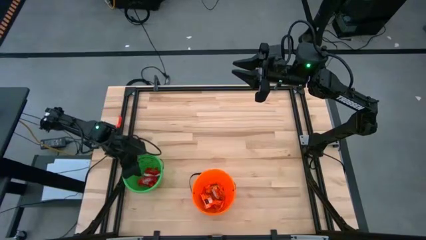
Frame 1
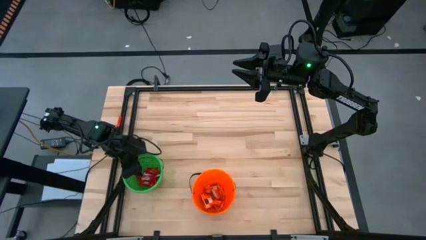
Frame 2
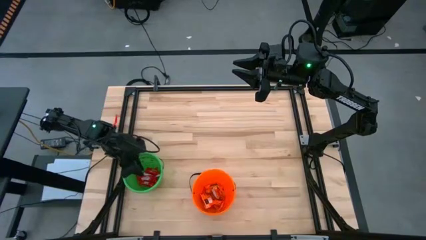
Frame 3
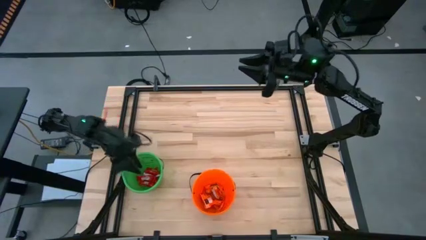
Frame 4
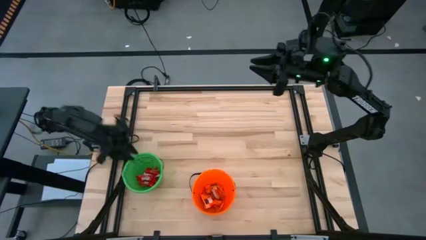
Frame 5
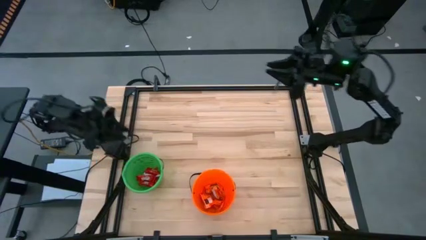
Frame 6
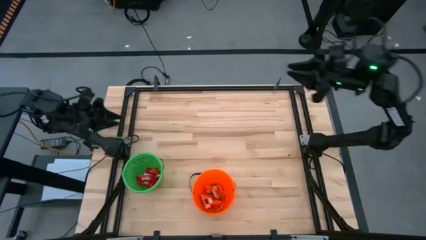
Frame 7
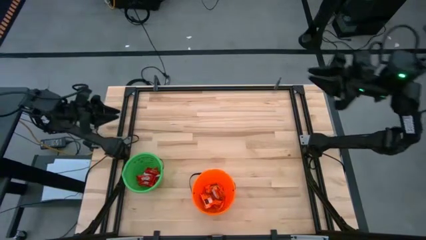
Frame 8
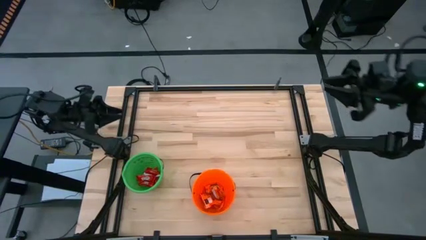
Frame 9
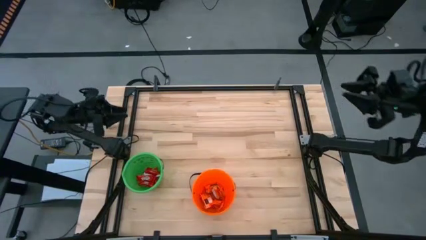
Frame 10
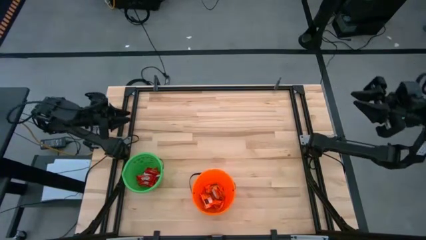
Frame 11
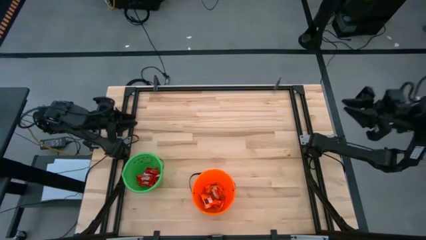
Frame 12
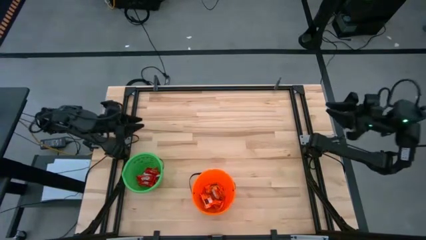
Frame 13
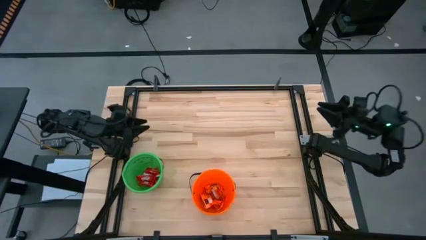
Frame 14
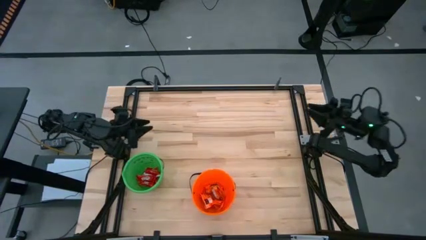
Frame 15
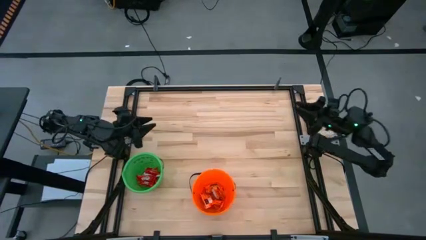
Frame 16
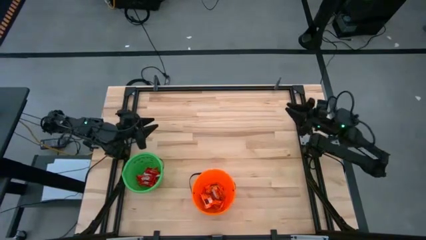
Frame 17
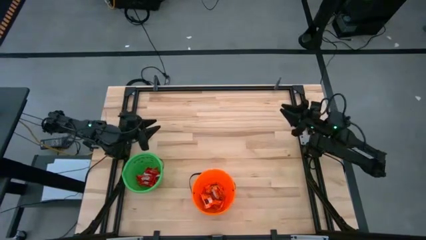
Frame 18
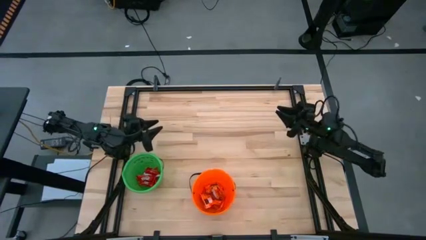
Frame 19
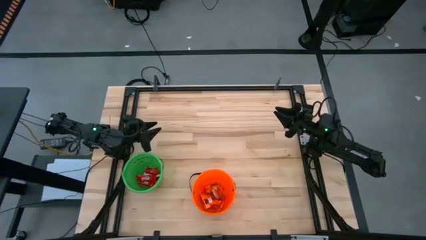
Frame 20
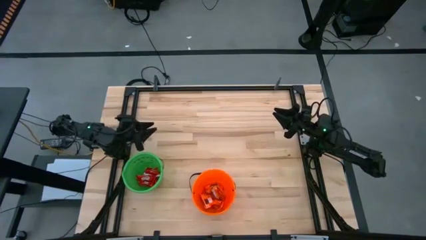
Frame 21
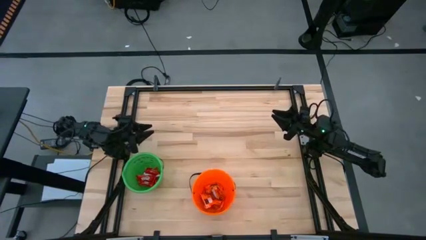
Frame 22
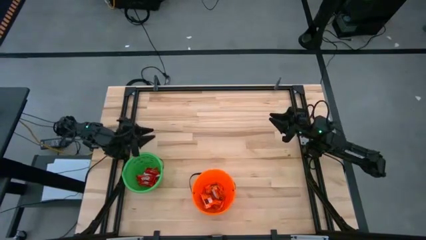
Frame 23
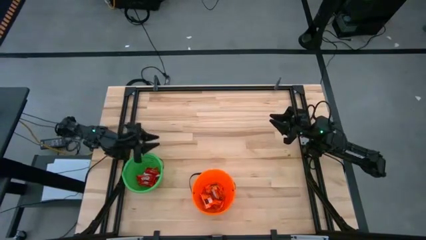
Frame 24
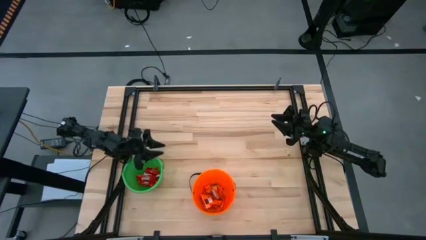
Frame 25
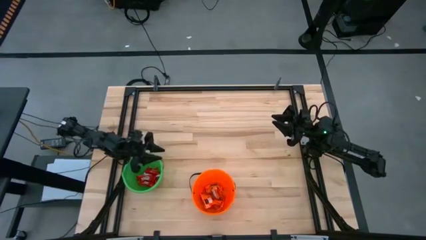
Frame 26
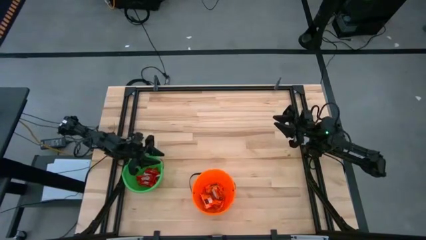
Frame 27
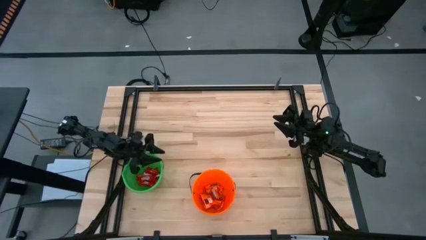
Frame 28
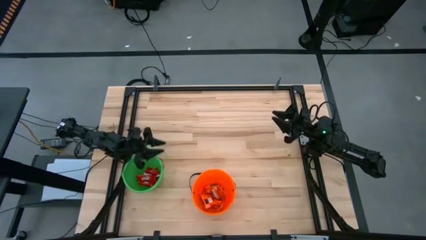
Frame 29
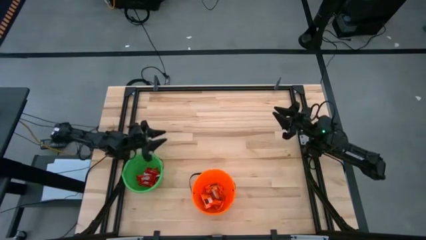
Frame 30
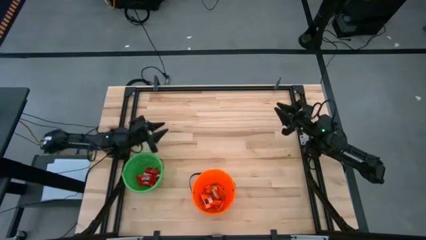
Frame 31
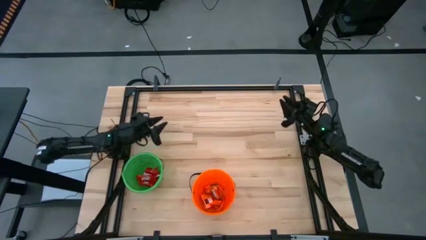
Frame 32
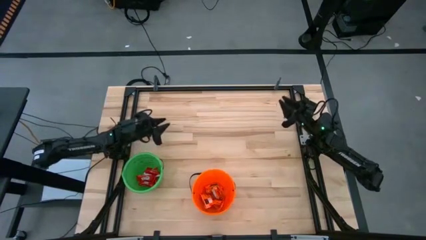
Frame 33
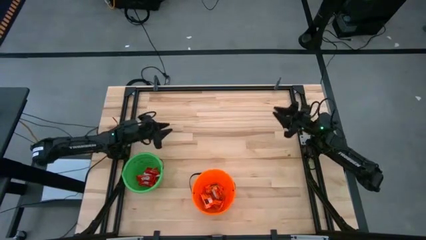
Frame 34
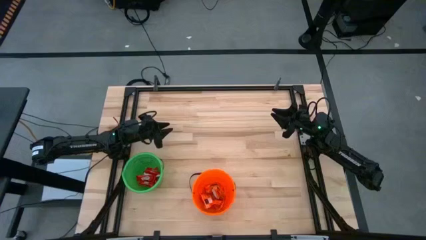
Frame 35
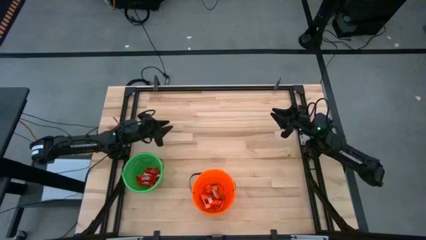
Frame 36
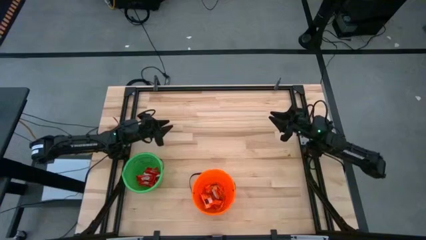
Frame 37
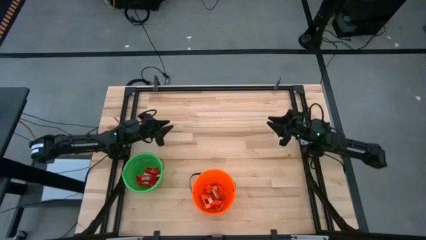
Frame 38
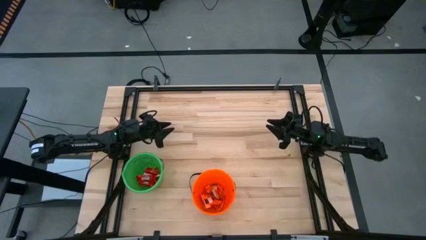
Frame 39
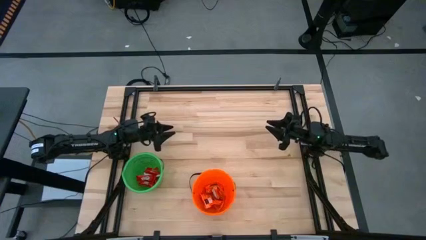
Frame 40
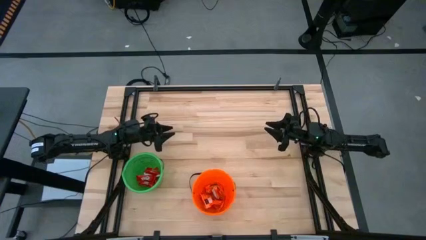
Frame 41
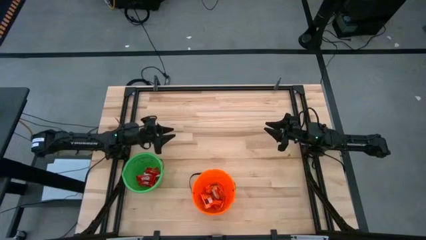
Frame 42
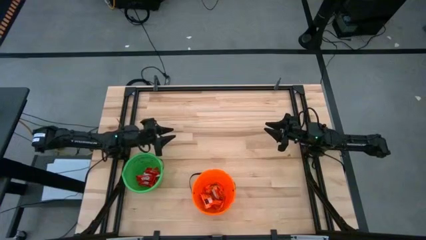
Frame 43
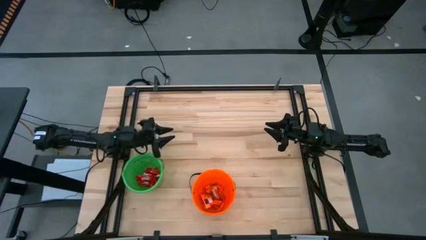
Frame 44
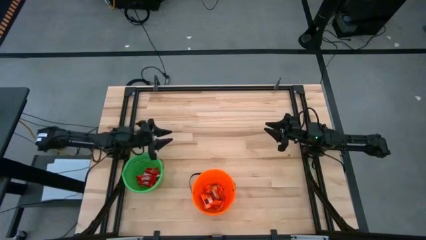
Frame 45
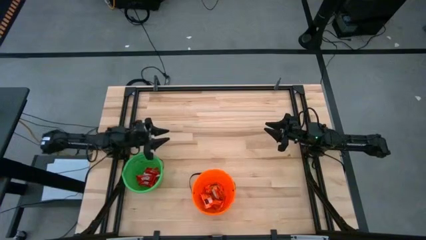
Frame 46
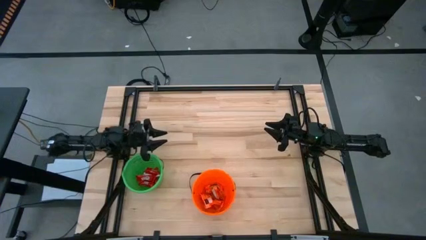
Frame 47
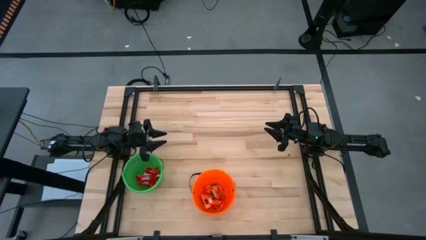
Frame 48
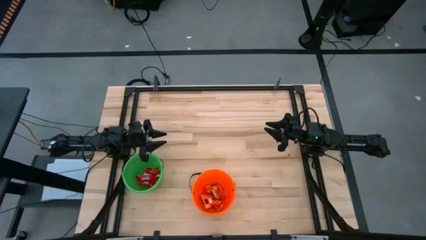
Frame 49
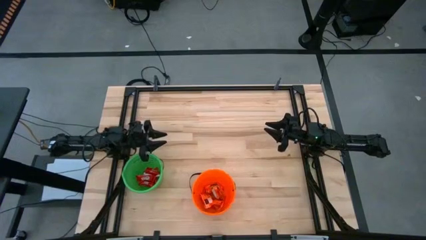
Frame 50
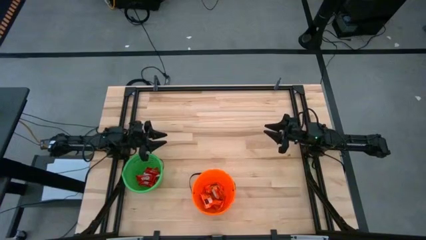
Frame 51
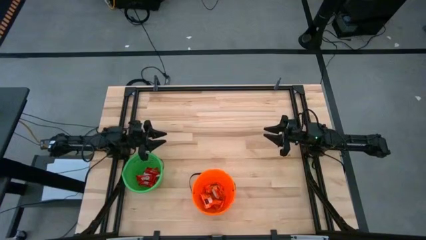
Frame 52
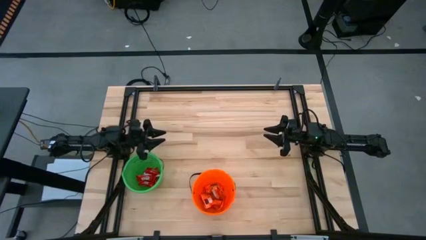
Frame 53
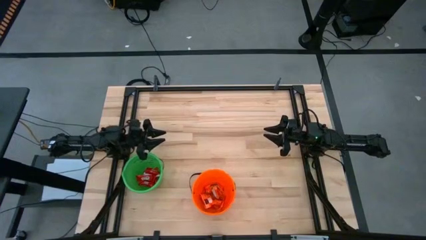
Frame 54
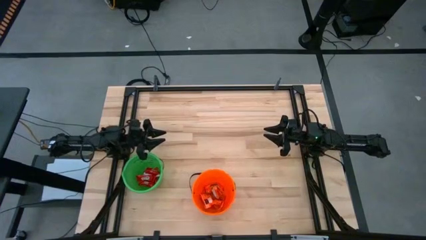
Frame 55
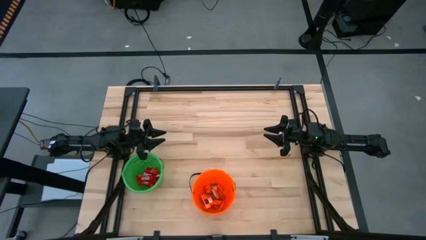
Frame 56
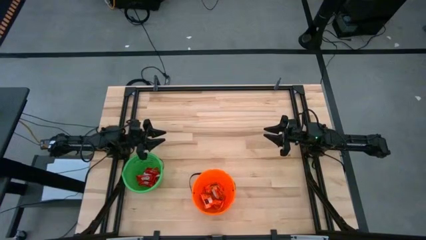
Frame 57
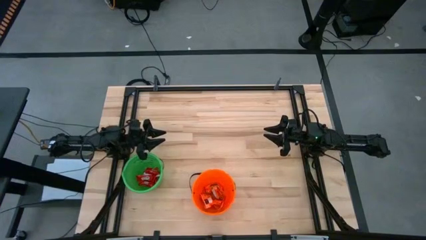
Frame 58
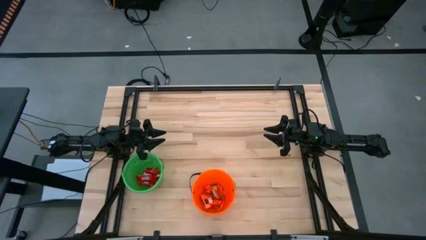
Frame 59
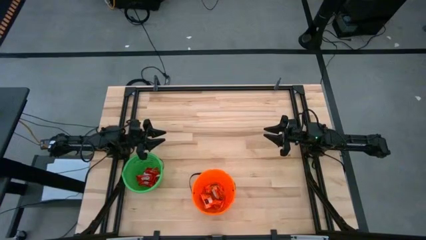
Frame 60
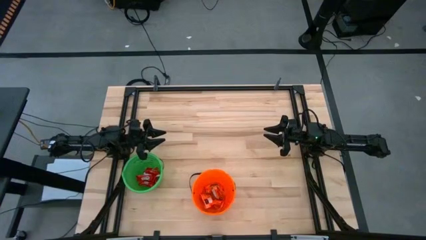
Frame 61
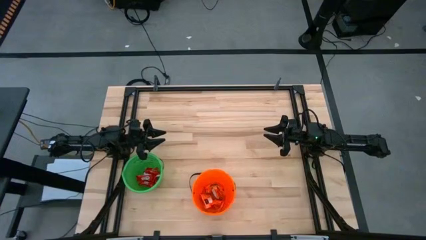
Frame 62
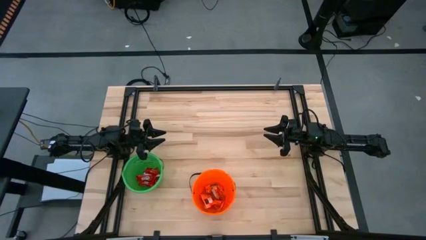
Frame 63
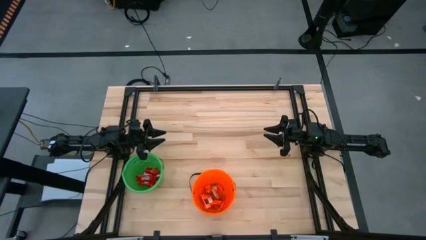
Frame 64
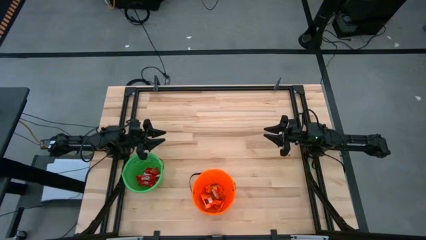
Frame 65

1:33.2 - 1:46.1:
Return to Home Position
